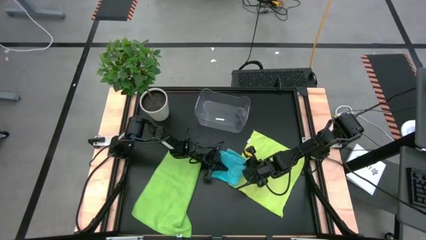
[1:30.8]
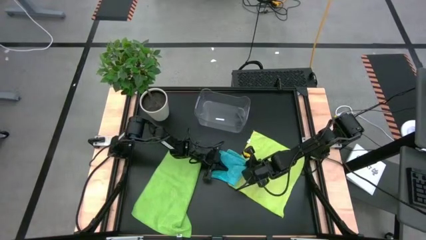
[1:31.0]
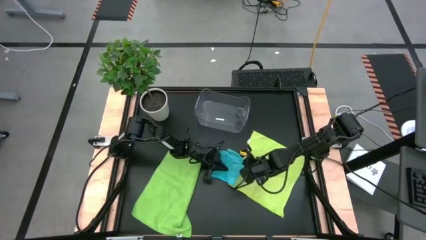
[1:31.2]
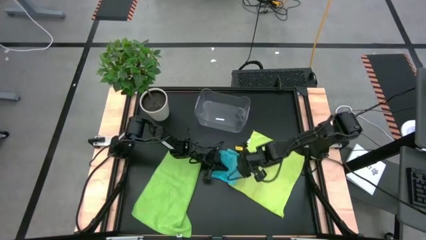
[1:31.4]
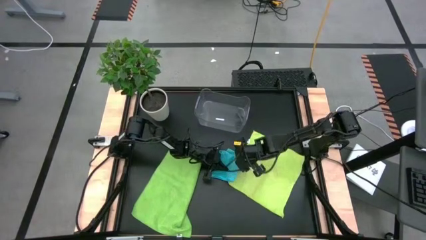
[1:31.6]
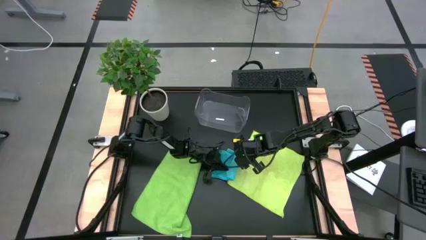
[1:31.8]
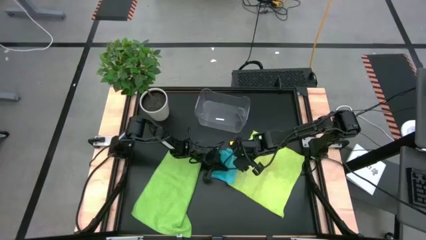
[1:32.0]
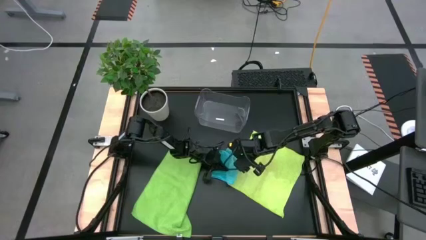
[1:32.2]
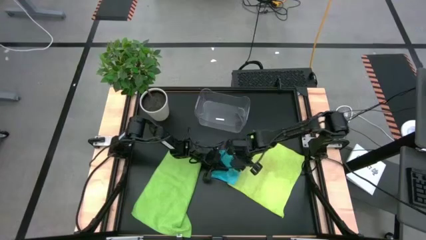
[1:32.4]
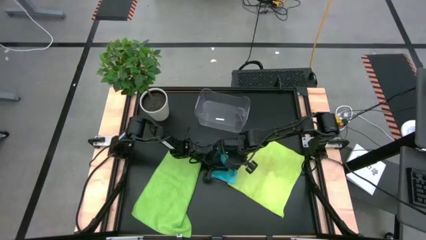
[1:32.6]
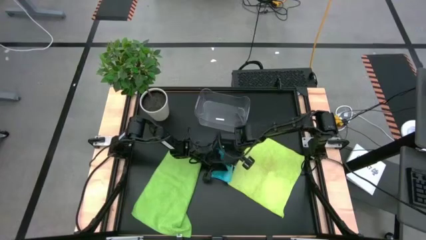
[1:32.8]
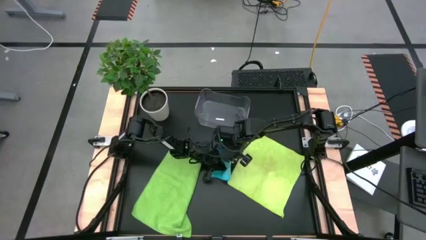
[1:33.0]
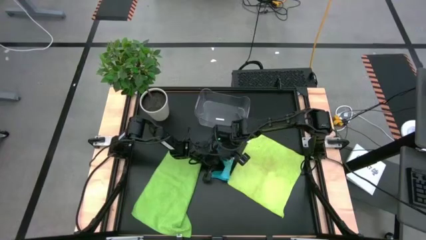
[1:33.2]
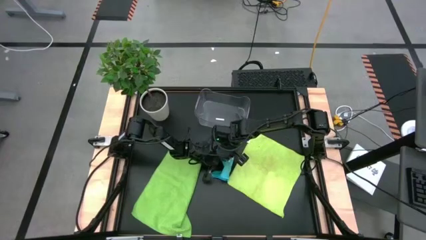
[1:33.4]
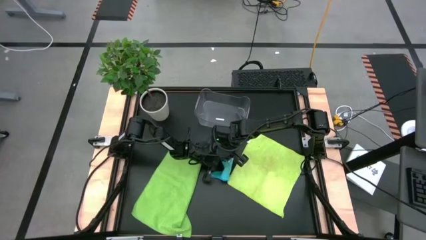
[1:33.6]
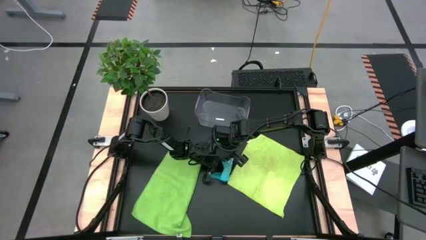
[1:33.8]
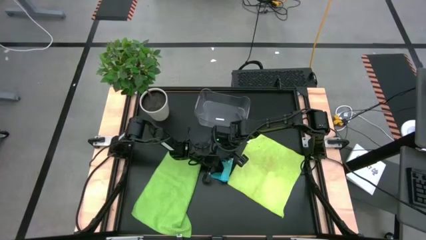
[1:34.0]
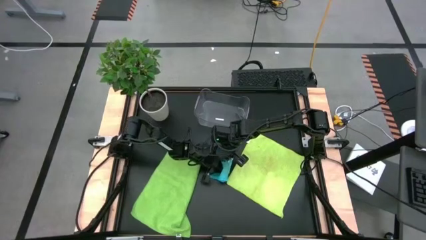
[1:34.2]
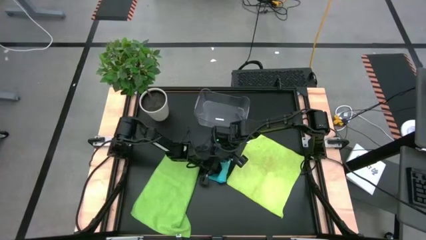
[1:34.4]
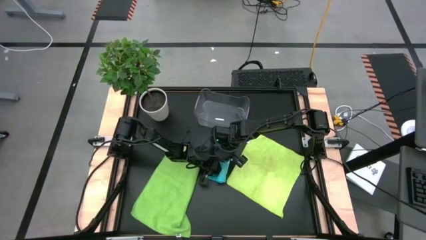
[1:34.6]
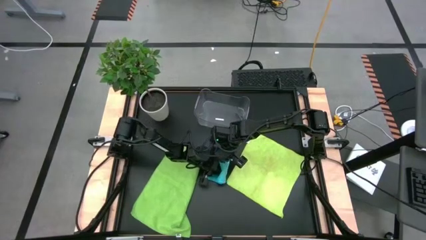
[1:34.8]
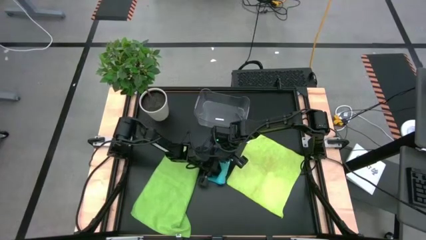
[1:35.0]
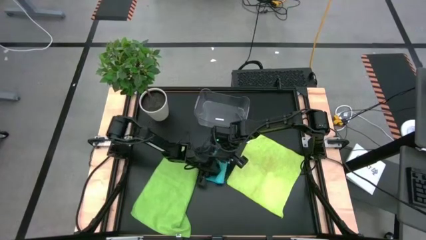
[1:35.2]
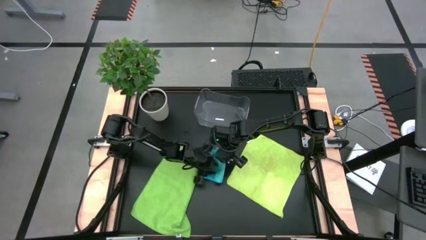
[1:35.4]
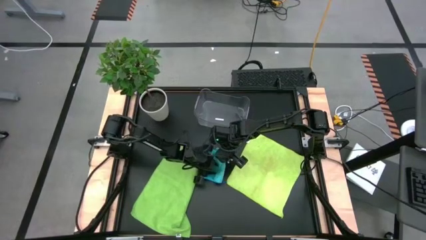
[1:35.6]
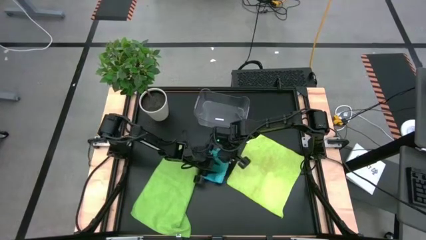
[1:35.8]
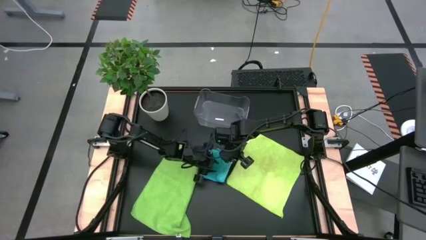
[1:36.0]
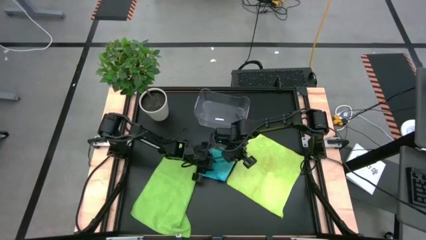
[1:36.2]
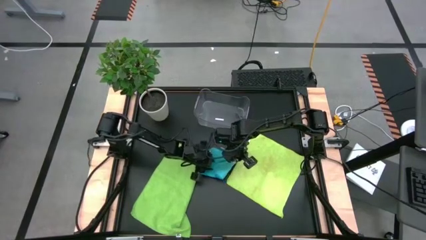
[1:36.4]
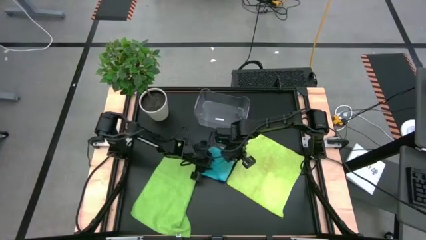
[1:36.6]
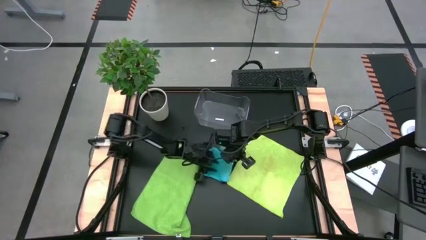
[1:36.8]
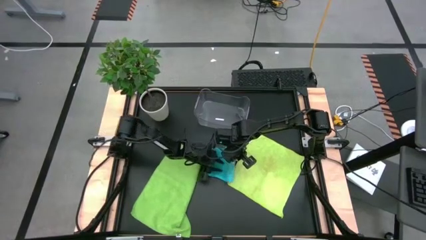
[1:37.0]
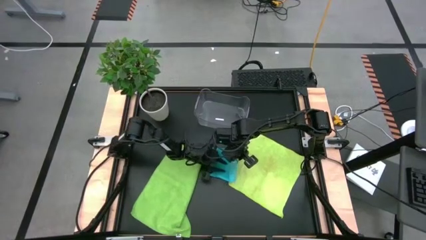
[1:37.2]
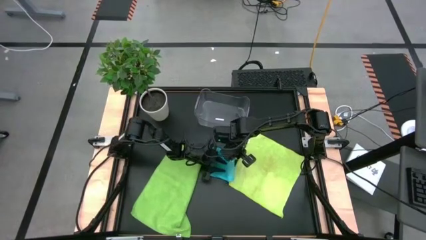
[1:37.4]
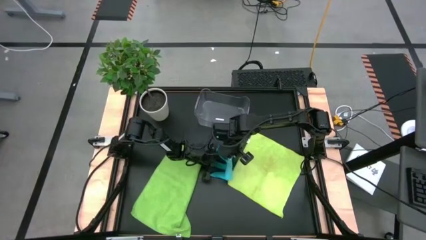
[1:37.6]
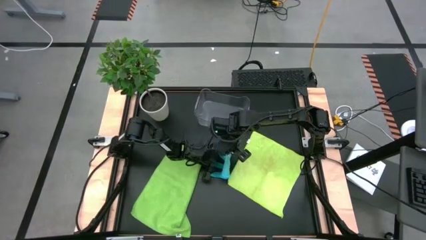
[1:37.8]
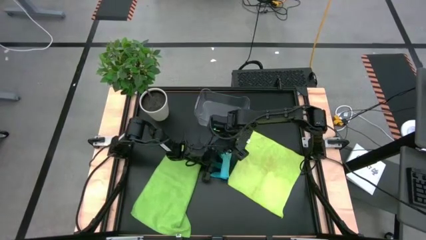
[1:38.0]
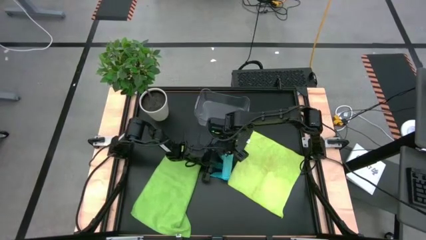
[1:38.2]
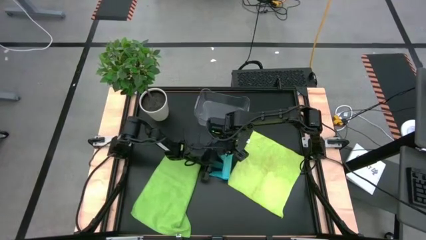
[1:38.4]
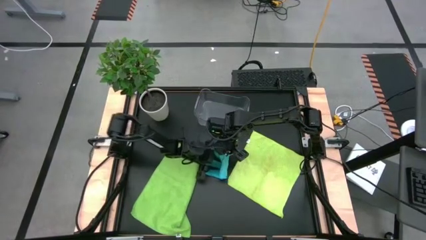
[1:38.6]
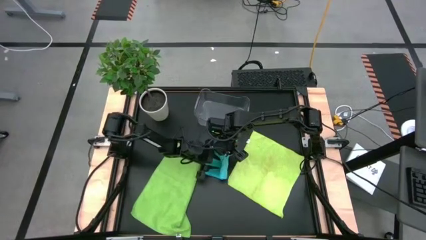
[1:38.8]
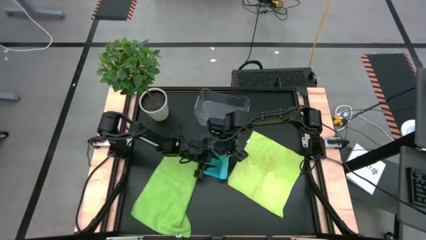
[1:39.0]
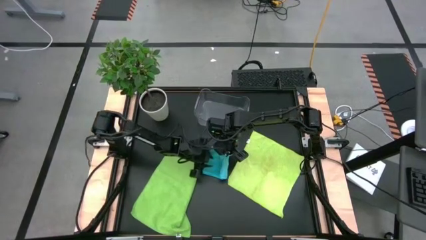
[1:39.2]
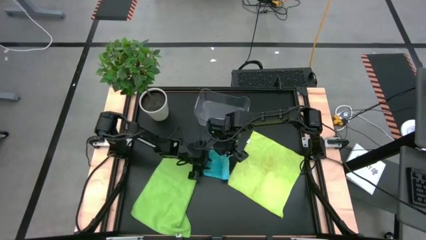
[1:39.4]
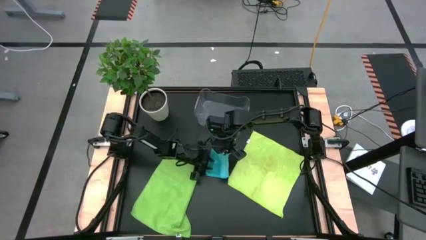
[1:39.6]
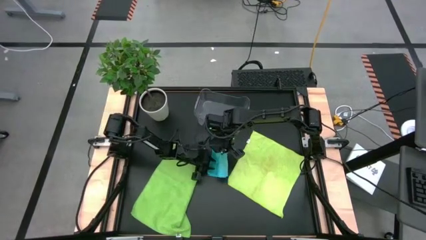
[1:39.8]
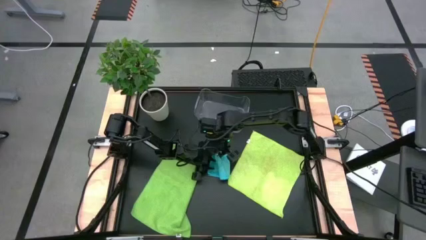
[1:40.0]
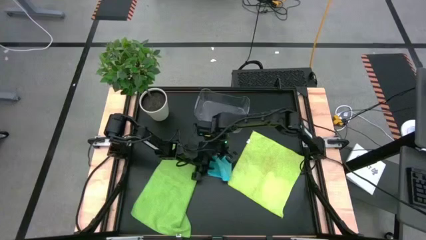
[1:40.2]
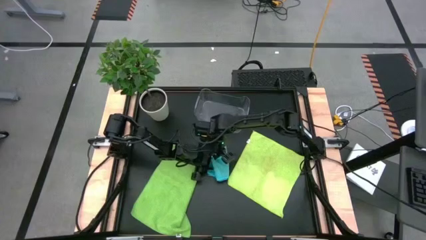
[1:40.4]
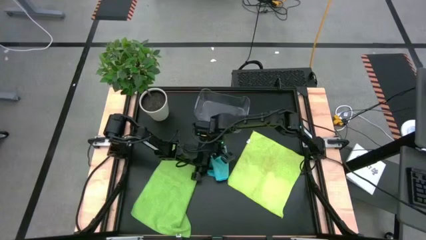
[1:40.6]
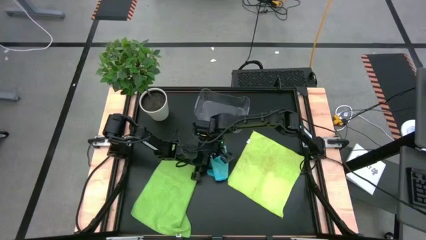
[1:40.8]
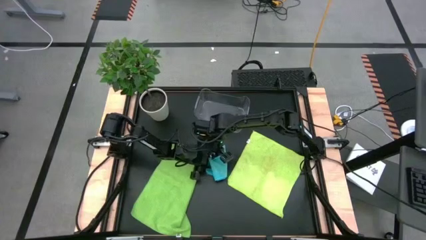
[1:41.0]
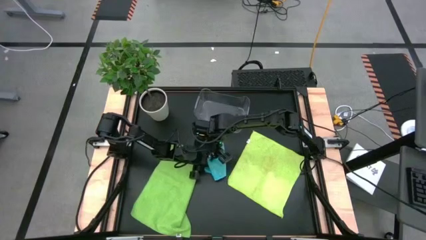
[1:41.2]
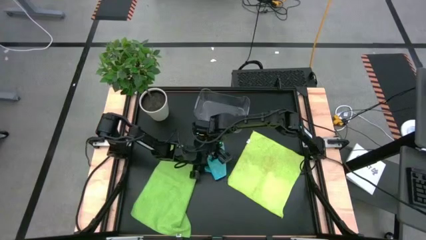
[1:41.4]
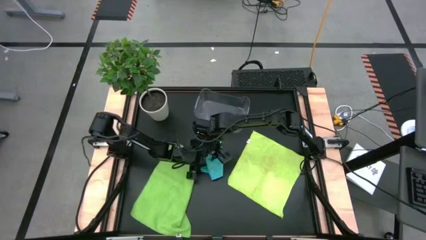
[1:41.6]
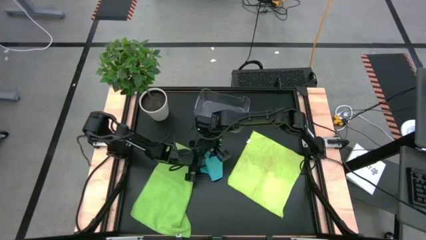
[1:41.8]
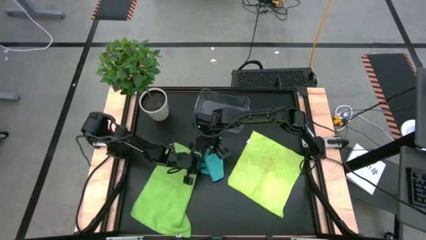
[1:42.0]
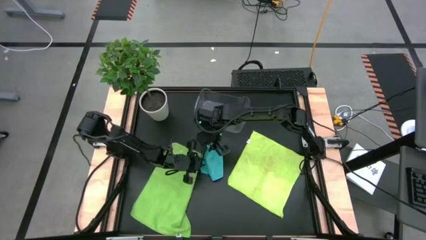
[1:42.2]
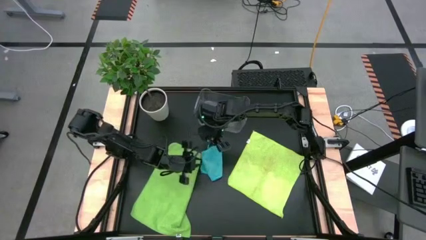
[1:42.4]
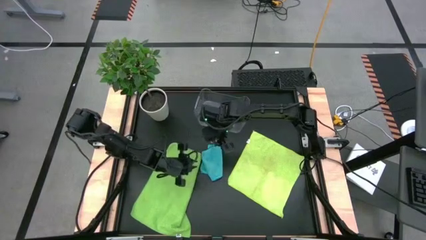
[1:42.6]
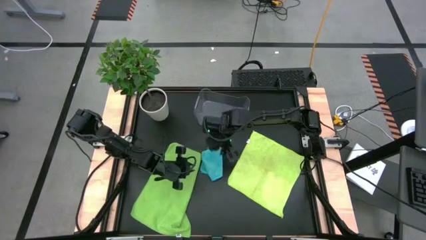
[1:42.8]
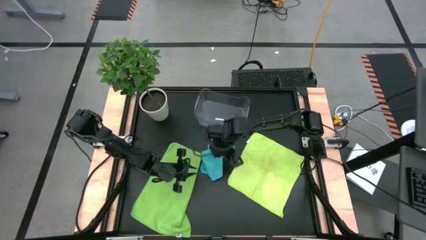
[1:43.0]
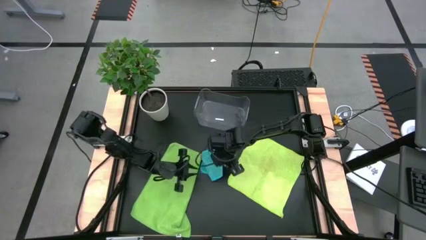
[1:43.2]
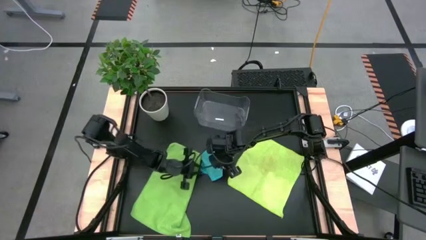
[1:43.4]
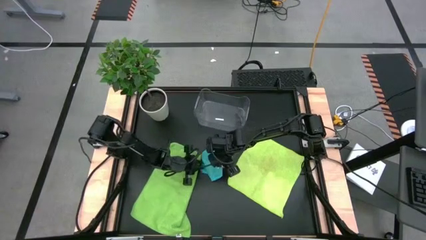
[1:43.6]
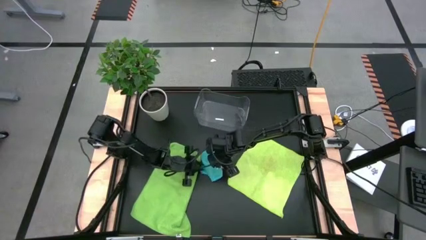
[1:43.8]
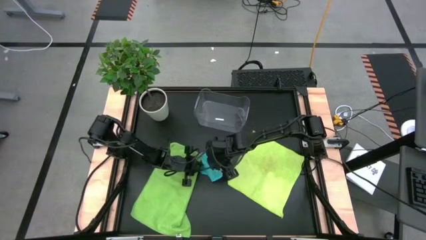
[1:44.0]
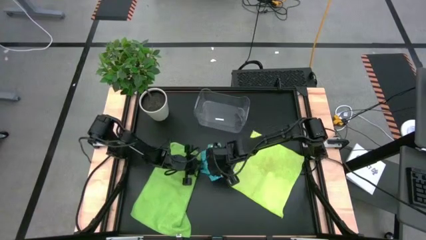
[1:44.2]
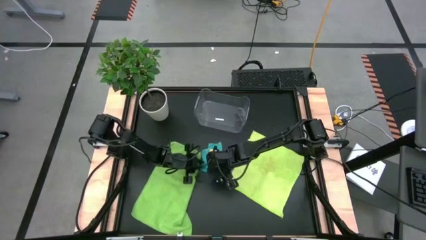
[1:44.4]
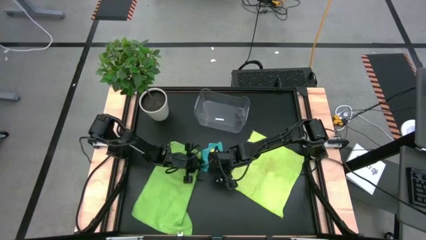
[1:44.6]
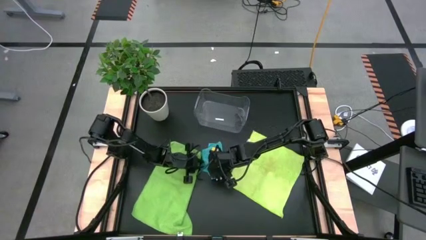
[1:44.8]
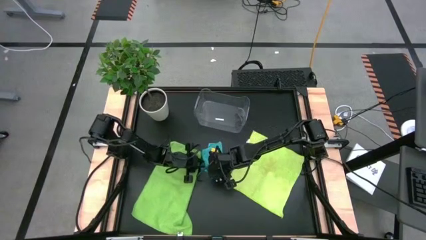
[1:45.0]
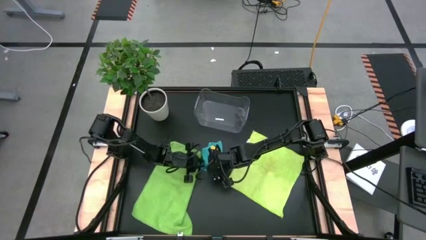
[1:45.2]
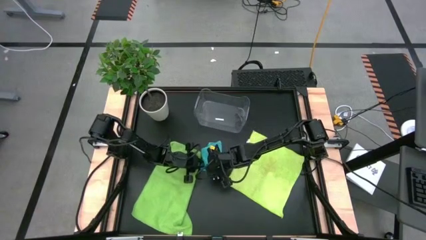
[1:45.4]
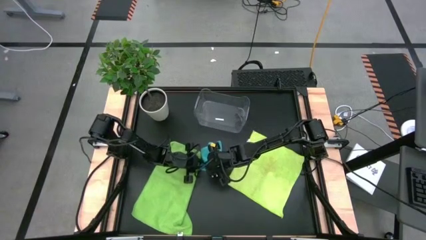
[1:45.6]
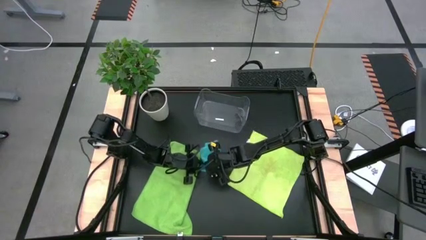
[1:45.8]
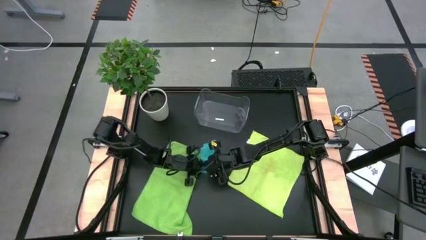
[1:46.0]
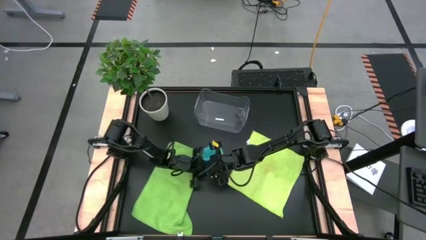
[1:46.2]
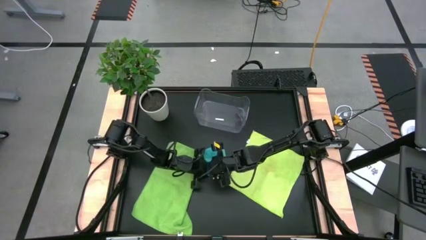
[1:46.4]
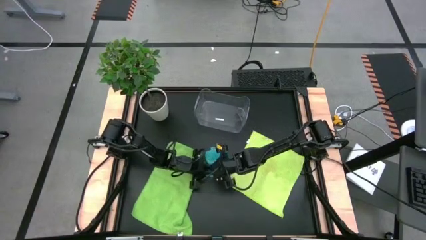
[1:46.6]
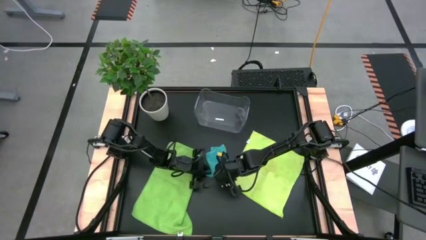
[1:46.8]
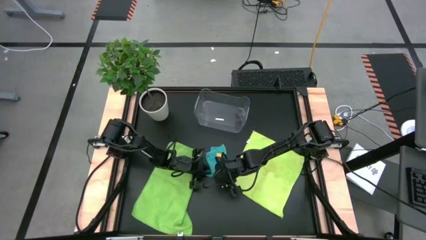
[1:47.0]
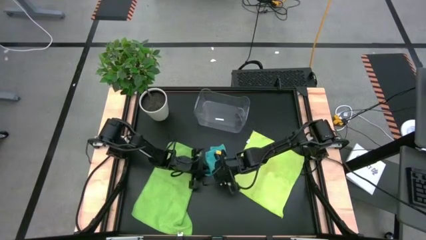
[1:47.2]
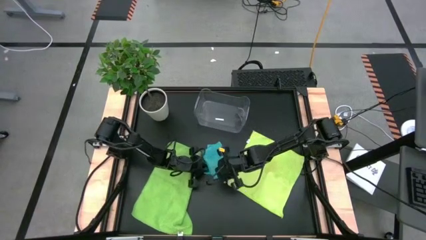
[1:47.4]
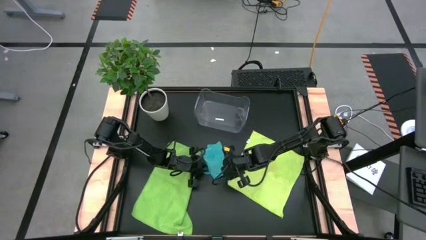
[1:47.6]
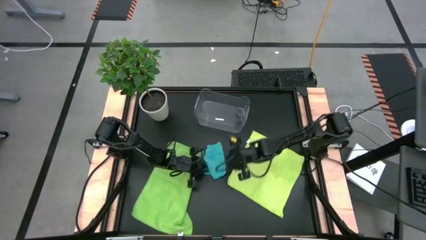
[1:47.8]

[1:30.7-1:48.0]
Task: Fold microfiber towels
Fold the blue microfiber cloth
